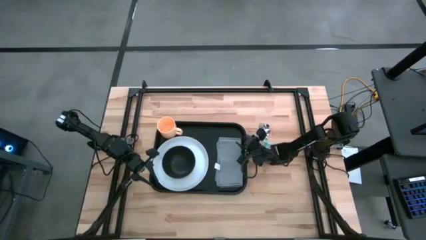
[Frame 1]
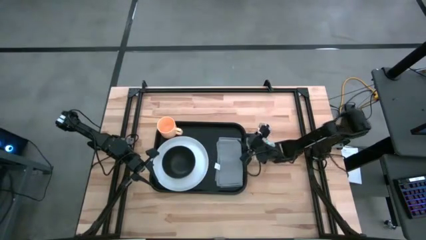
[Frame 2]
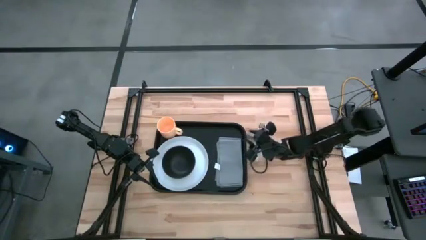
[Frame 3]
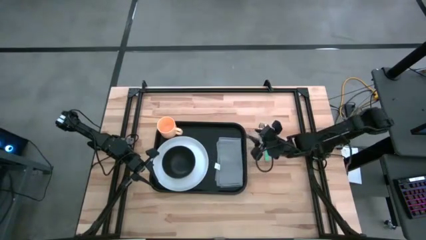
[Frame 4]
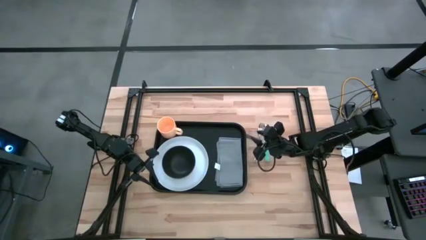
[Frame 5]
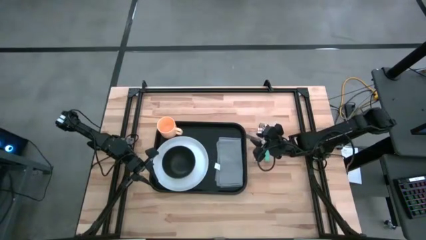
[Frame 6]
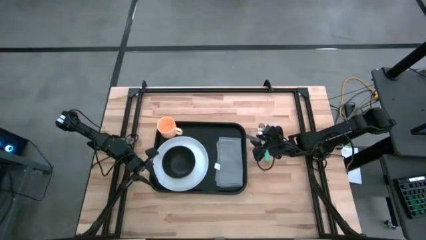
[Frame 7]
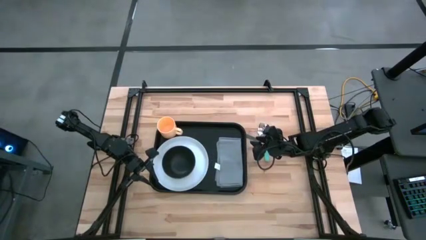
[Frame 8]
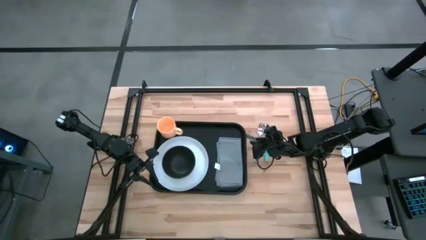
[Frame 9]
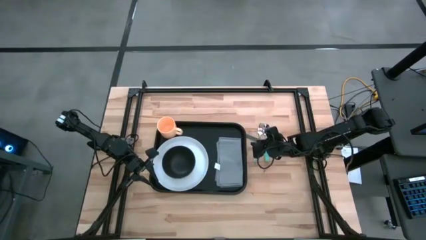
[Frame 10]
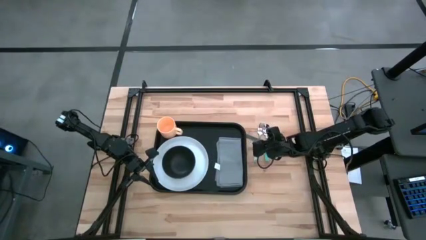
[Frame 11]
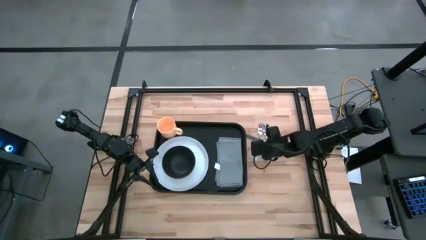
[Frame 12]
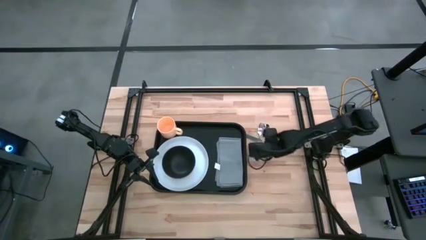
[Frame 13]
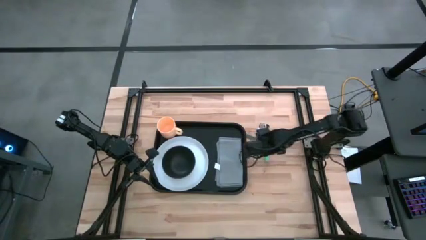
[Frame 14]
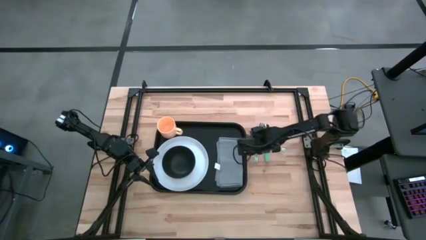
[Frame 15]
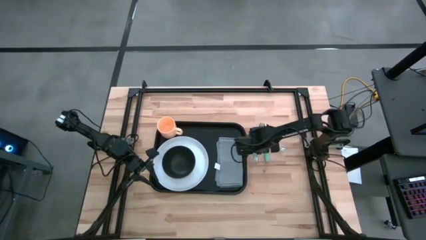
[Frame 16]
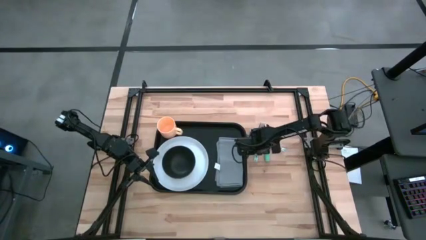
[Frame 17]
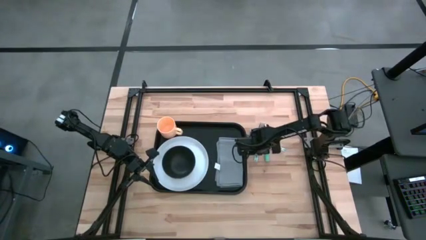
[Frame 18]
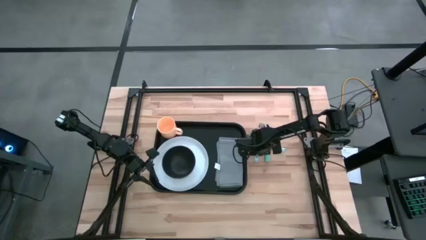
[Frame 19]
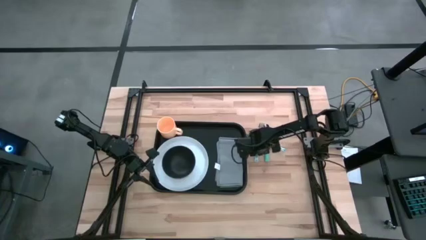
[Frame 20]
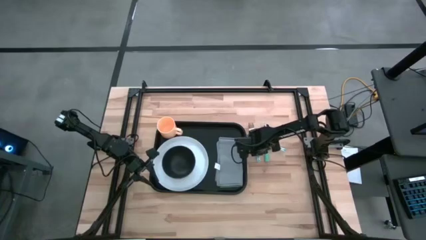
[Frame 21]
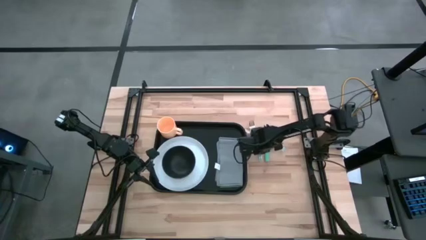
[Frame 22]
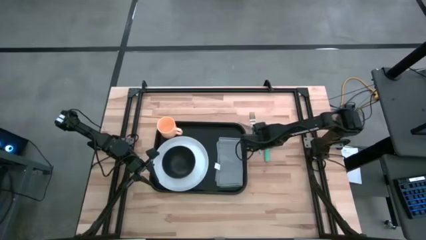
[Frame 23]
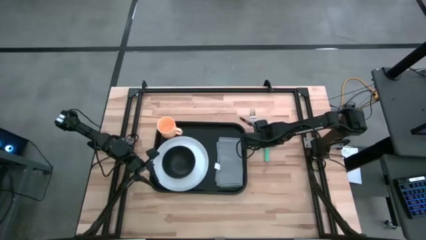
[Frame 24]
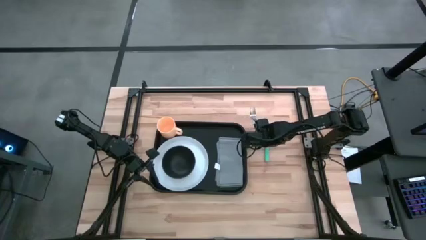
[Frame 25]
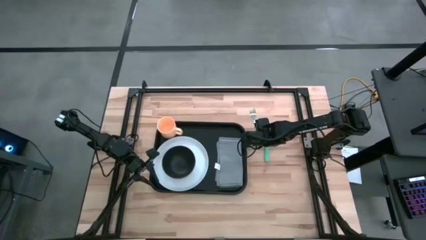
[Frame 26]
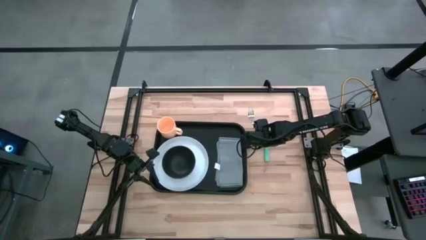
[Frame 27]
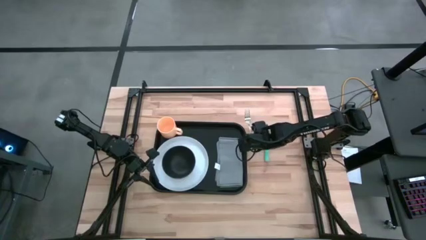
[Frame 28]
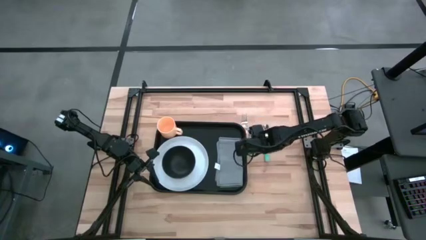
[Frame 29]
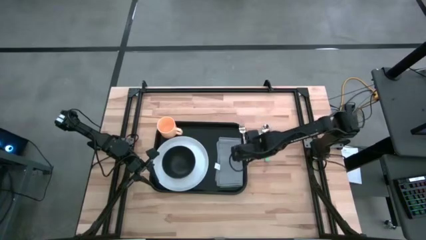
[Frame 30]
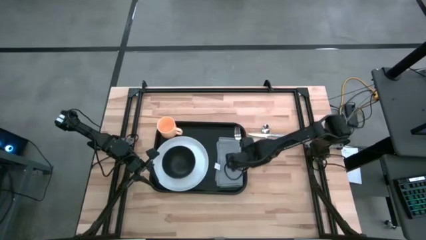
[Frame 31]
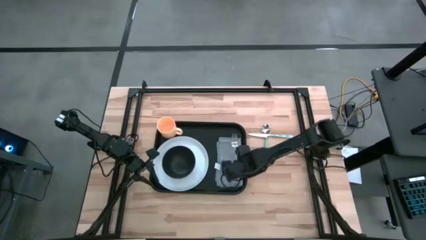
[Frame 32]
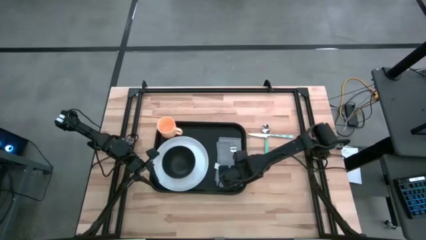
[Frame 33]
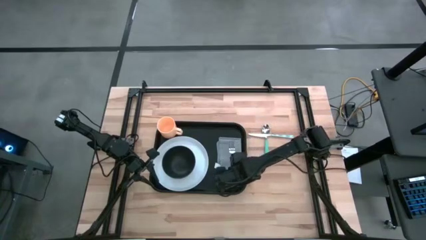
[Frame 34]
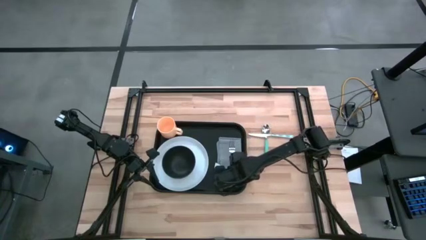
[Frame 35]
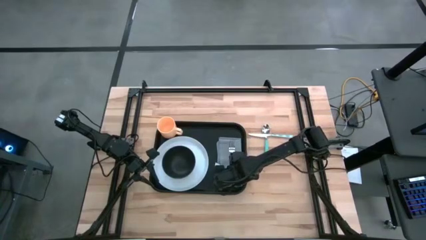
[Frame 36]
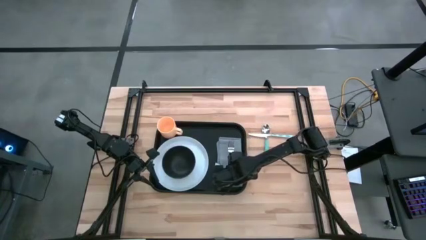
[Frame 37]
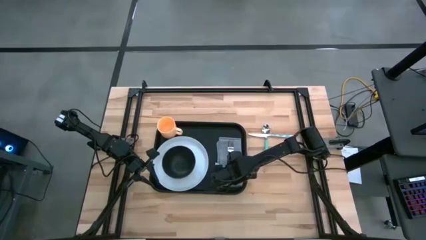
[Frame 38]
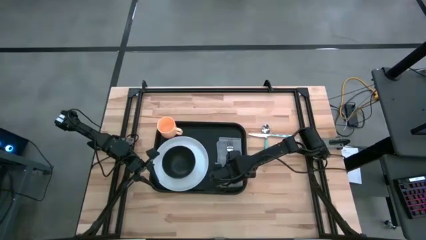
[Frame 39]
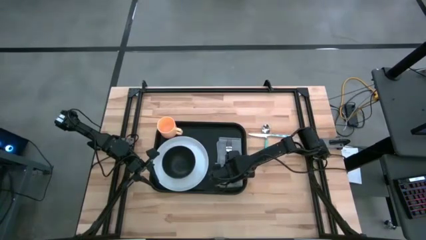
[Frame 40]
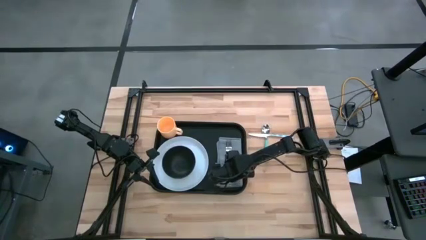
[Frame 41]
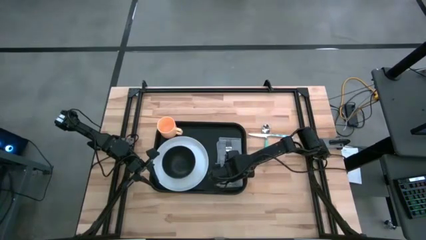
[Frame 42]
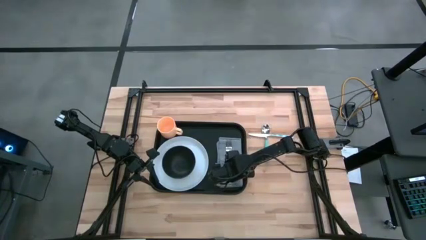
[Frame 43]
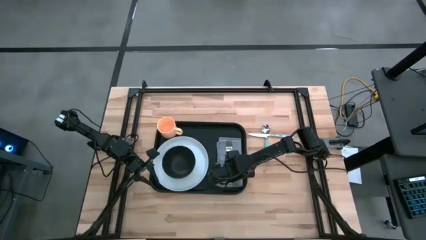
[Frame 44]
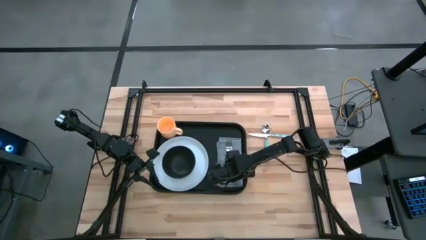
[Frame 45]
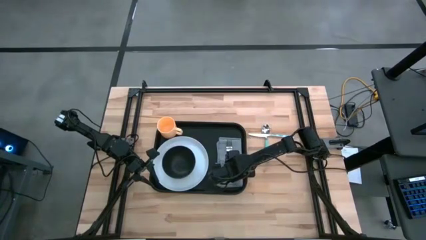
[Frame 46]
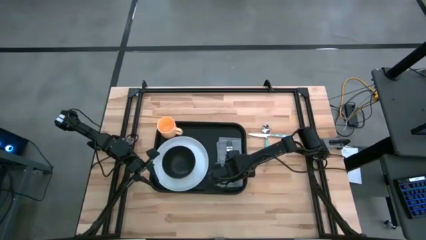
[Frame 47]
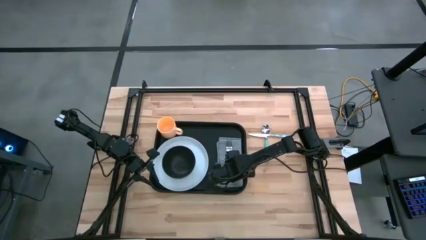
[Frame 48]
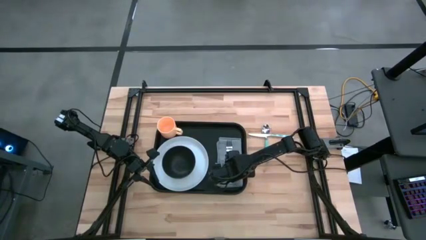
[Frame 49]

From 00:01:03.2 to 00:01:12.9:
Task: Set up tray
Put the blue patterned fork on top of the gray table napkin

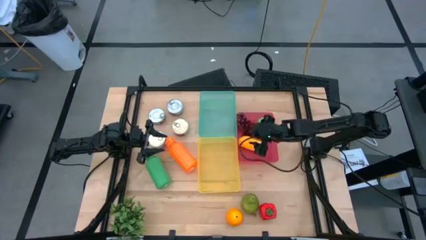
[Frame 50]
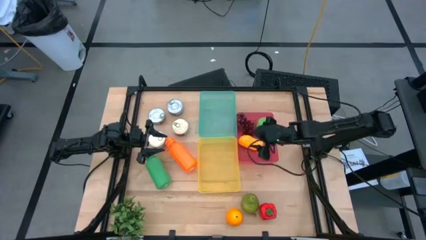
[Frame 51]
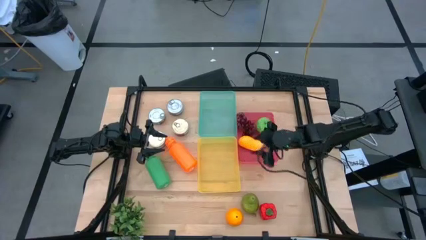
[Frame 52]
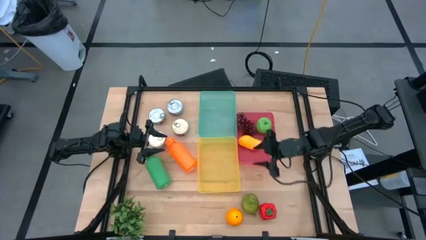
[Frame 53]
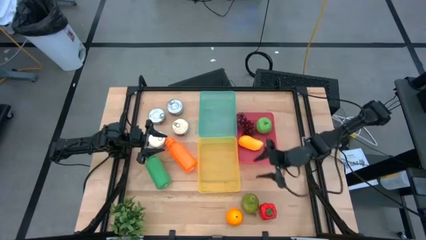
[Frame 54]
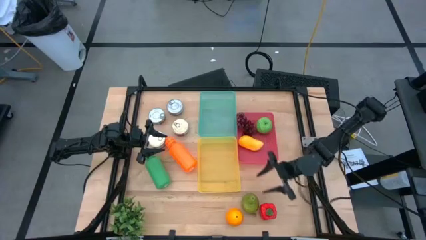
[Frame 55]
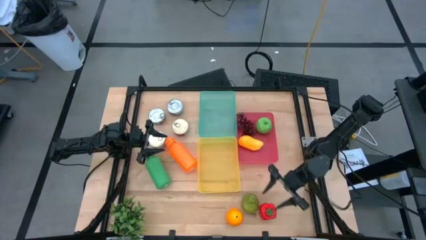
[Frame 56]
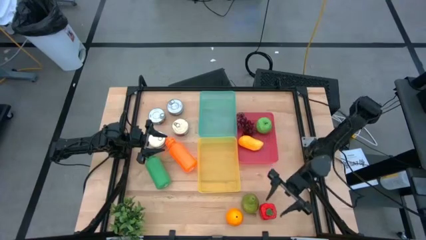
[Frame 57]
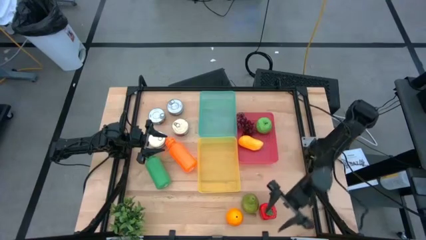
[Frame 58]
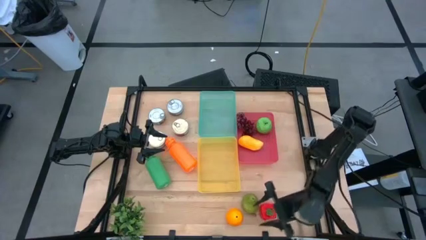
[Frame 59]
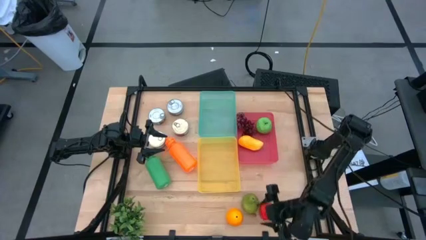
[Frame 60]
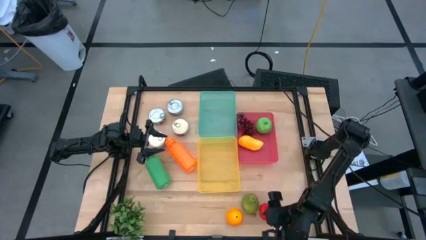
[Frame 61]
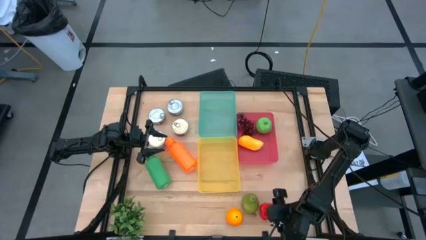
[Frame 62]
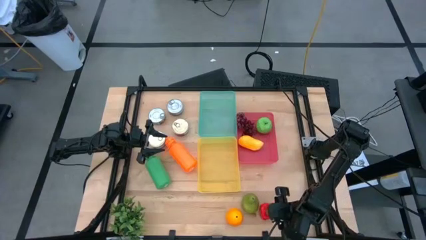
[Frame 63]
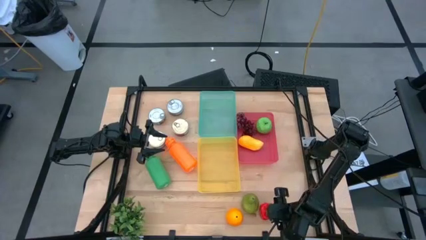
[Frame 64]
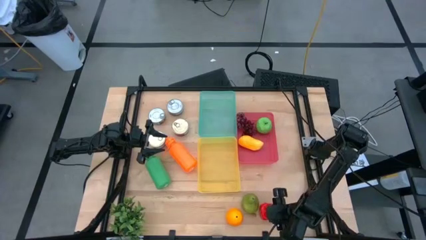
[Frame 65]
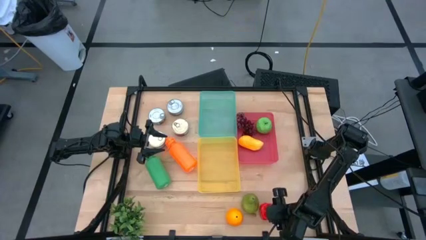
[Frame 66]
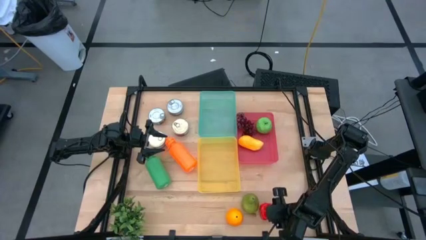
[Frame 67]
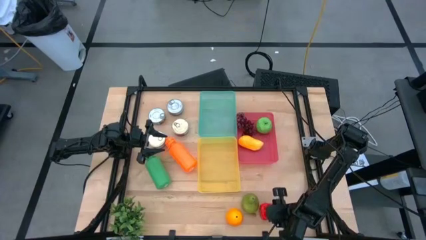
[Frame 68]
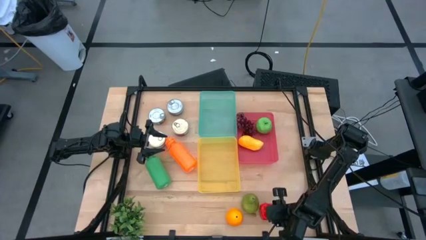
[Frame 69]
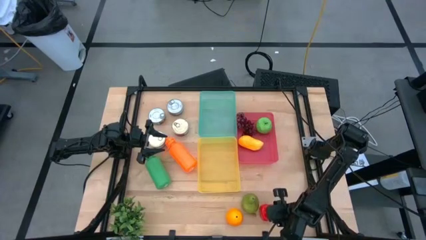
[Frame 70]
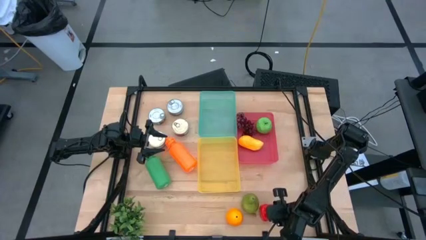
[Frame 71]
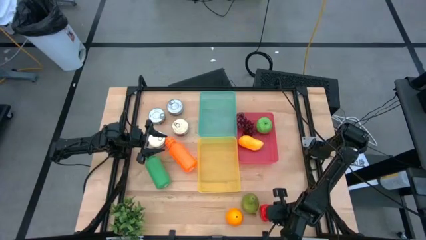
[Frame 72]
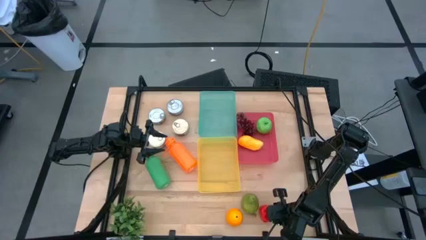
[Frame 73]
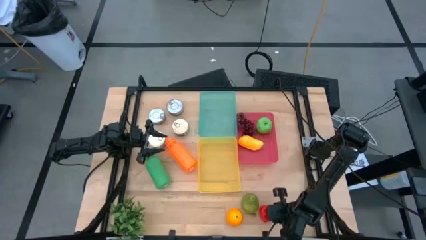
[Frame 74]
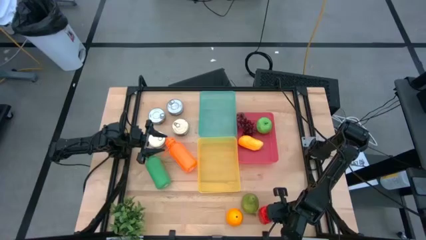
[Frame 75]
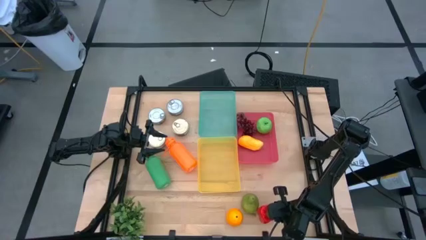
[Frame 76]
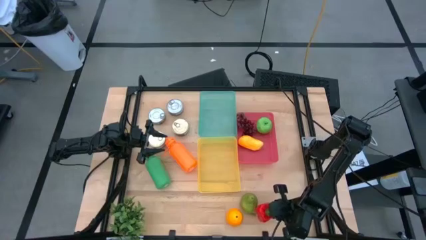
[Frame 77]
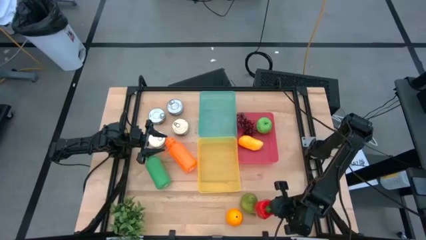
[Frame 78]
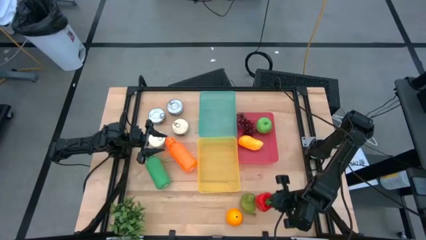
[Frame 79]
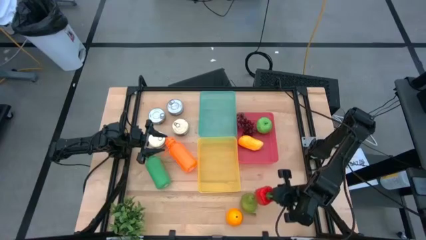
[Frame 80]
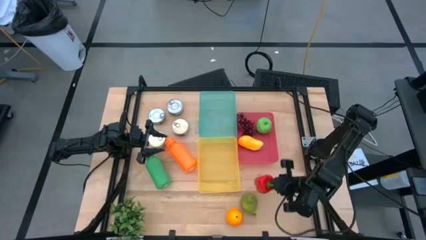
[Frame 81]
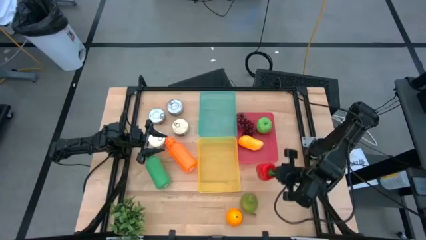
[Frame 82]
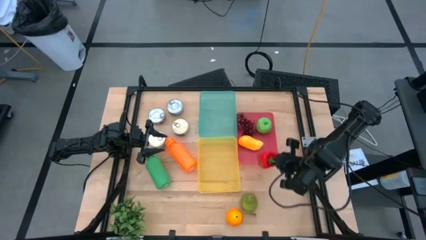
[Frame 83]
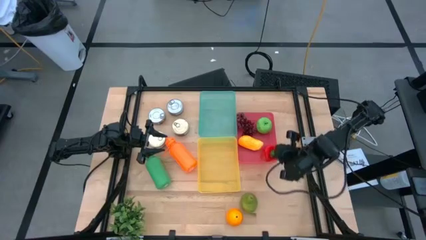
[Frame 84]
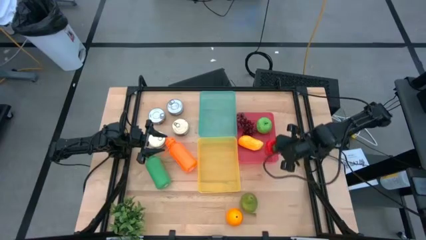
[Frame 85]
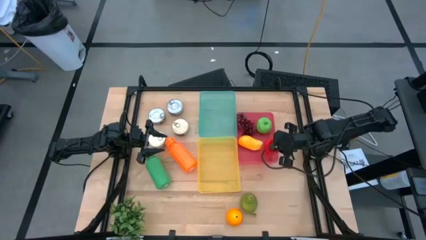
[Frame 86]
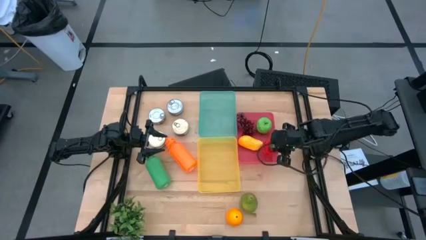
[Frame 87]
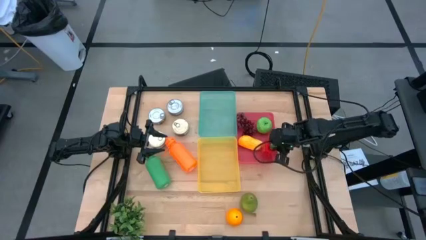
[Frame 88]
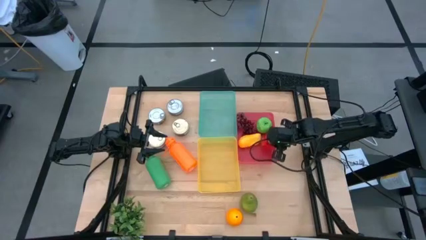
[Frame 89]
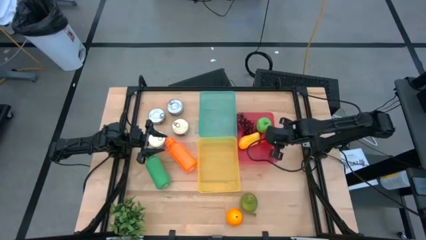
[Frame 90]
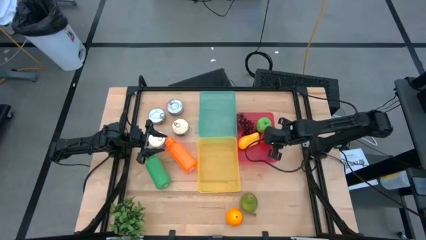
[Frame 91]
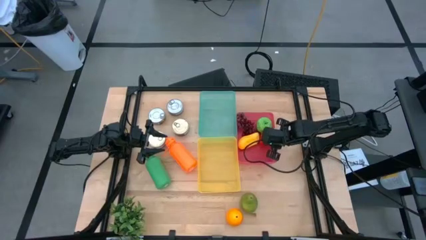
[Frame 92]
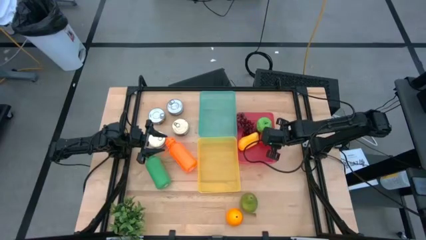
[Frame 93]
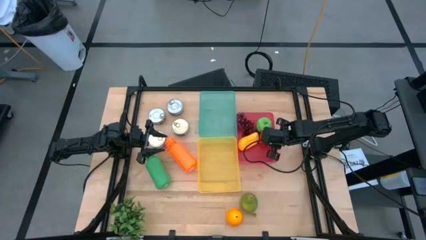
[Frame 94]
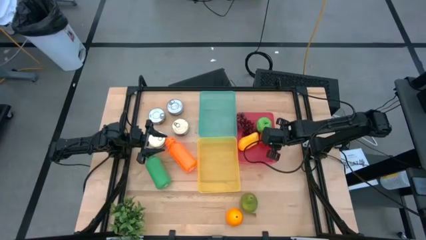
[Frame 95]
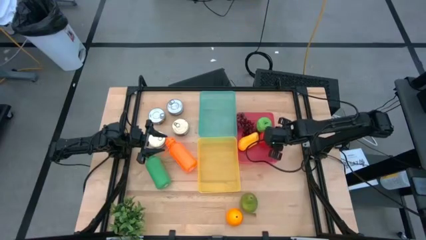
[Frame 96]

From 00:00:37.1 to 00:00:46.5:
Task: Pick & Place Food Item
Put the red bell pepper into the red bin
